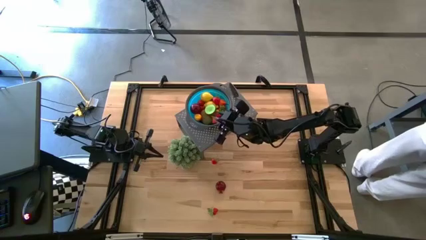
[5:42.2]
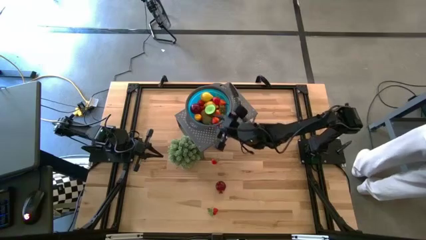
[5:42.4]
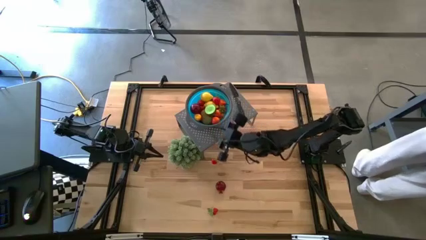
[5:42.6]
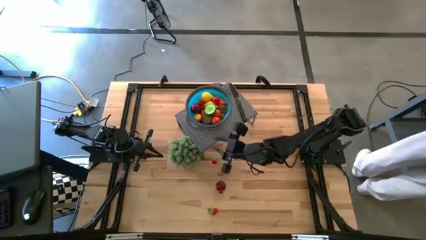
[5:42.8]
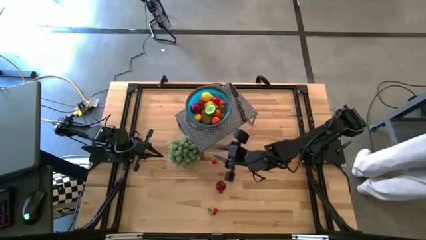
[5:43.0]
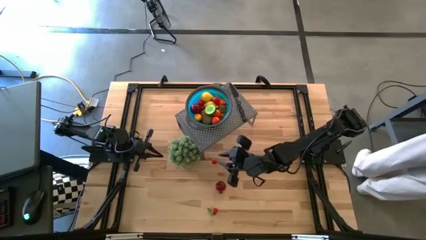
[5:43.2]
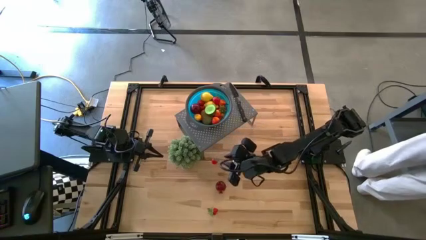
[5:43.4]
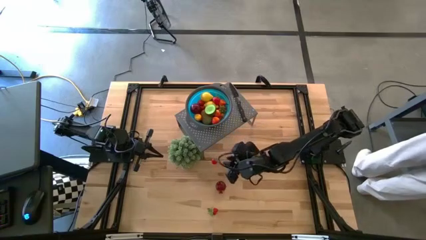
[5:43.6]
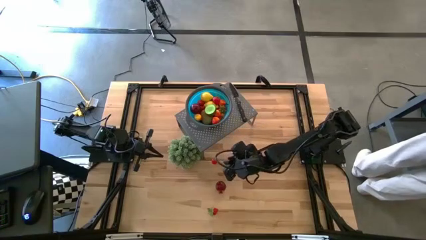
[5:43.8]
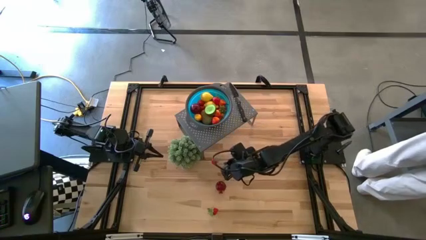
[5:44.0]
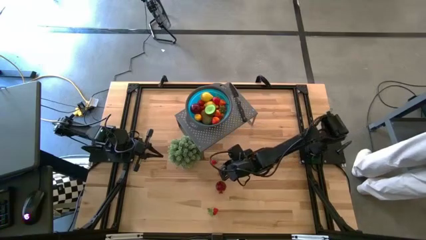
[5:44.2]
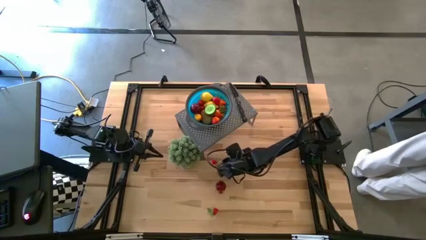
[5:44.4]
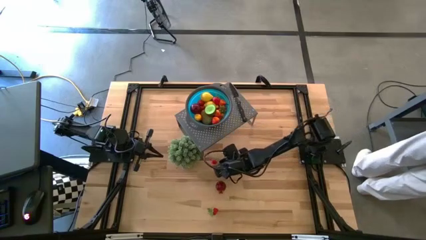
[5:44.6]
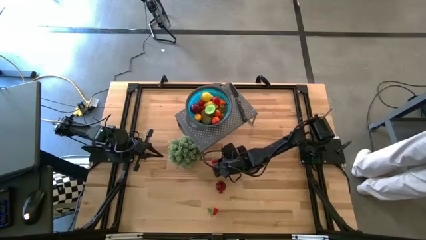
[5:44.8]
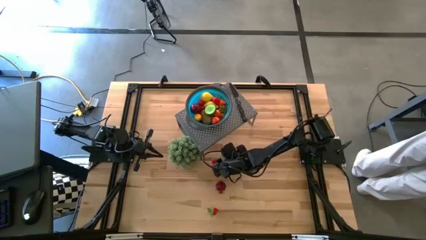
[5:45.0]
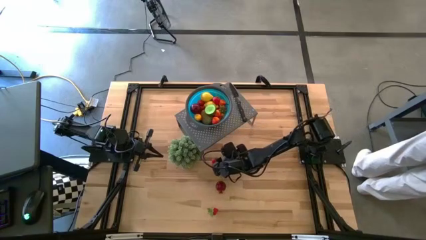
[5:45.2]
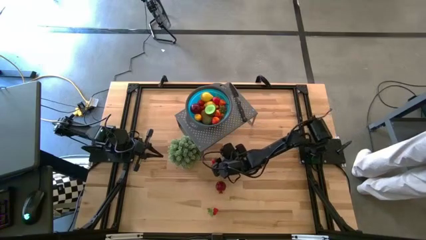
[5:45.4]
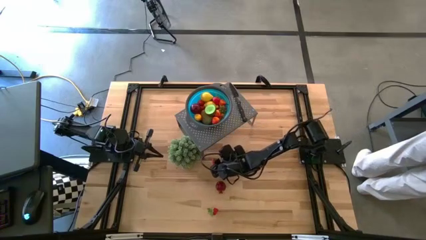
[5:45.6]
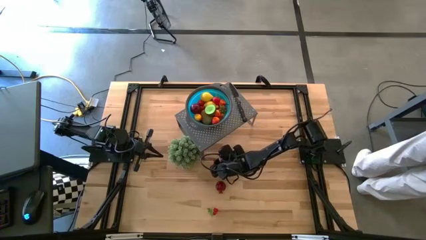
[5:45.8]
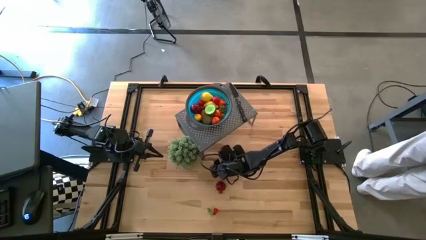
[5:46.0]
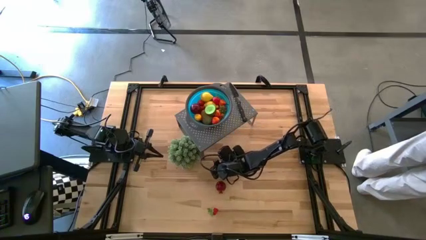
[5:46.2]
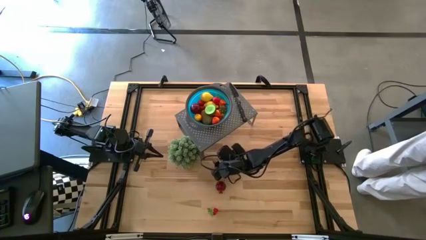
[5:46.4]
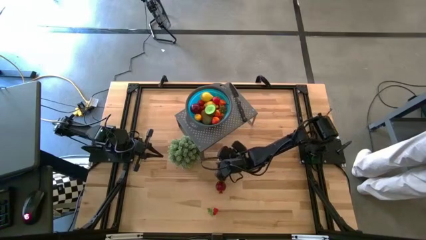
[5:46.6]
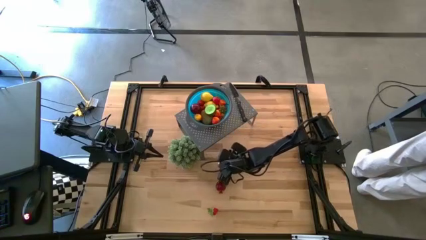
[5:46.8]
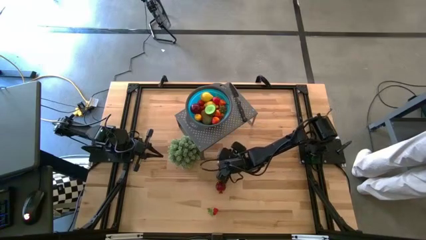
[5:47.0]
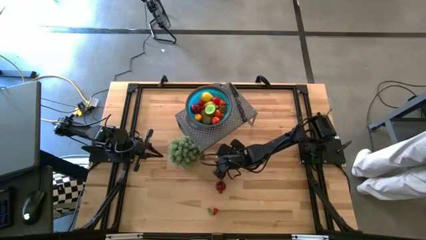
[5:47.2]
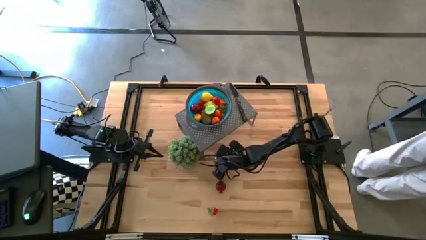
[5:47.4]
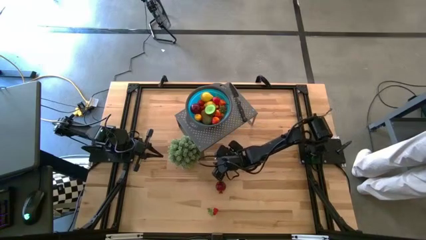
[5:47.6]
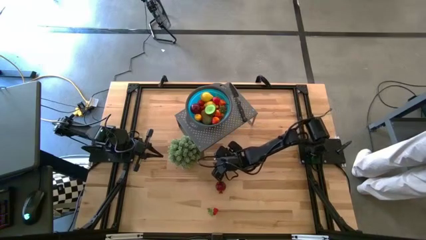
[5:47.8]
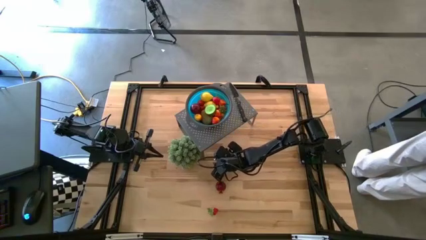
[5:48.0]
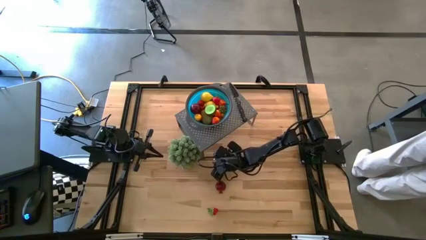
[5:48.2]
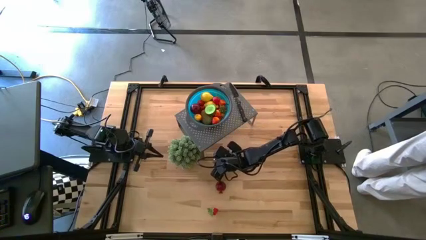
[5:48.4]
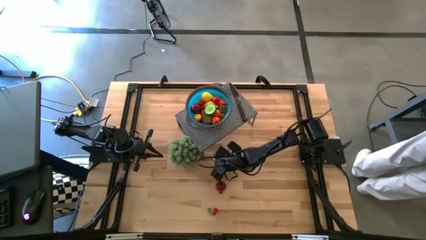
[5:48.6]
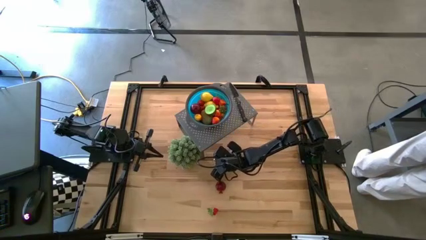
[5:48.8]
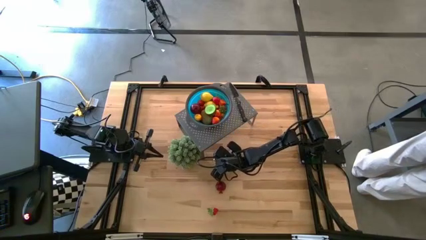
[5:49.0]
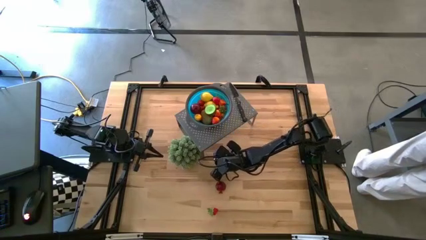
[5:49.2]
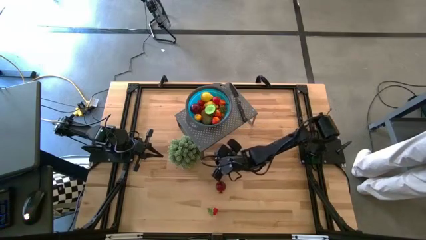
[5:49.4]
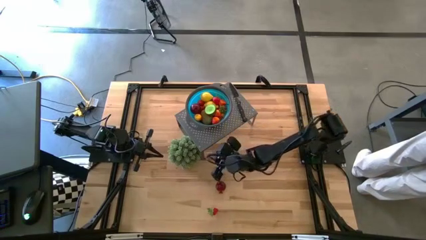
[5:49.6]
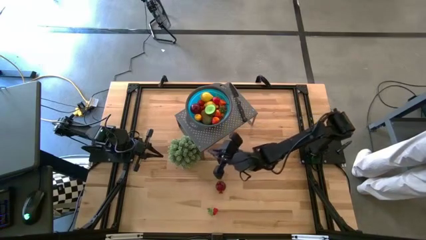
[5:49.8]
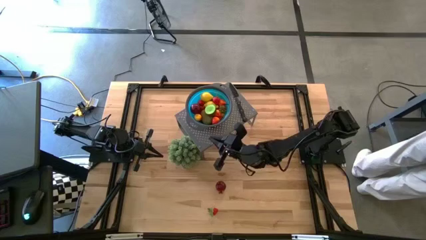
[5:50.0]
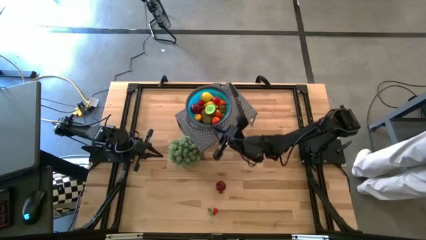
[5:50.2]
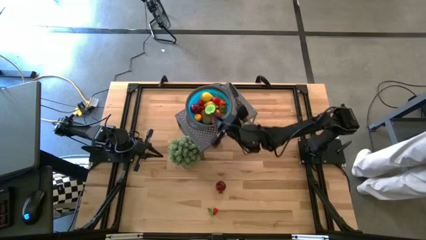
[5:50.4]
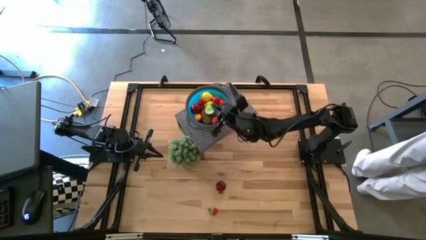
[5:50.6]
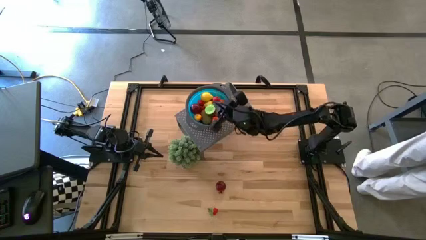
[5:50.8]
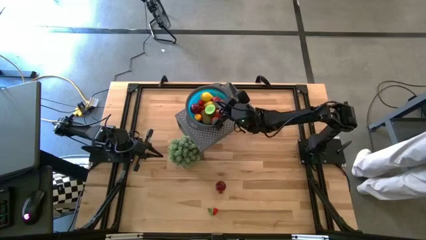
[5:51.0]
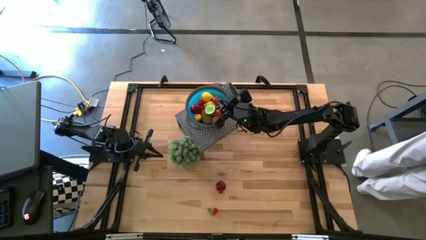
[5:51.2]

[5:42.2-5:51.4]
Task: Pick & Place Fruit
Put the strawberry into the blue strainer bowl on the shelf

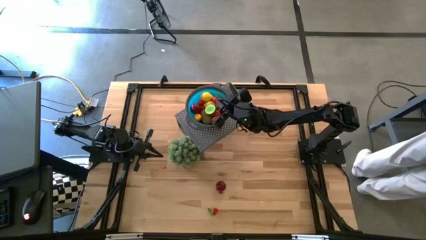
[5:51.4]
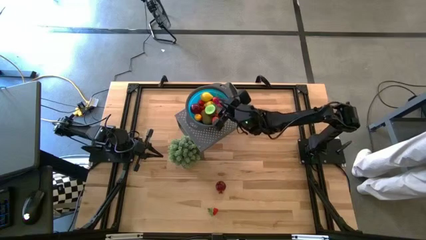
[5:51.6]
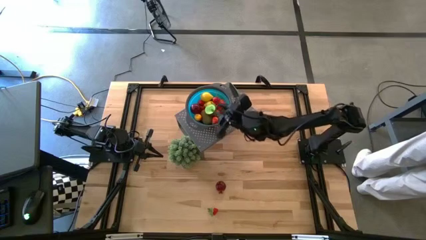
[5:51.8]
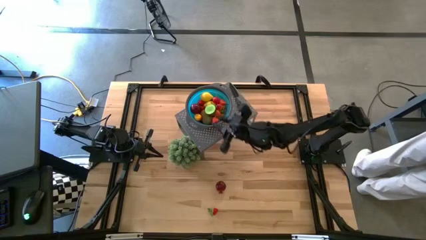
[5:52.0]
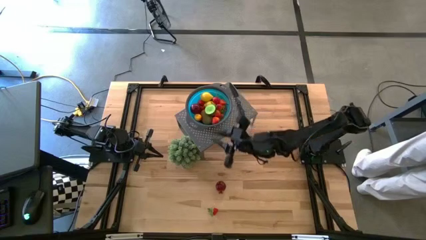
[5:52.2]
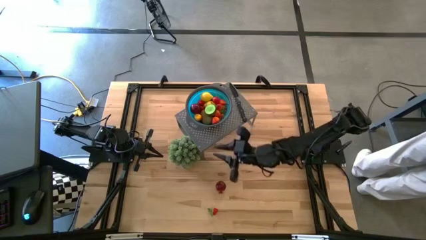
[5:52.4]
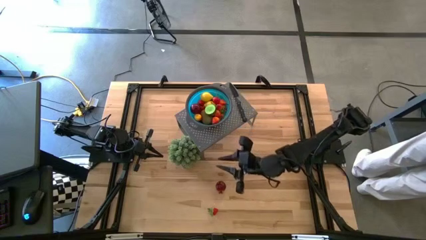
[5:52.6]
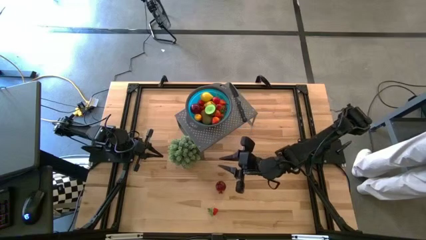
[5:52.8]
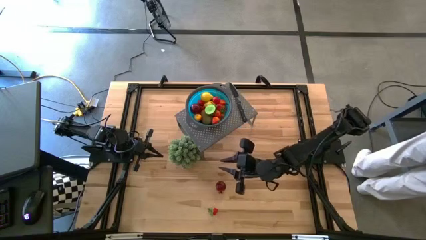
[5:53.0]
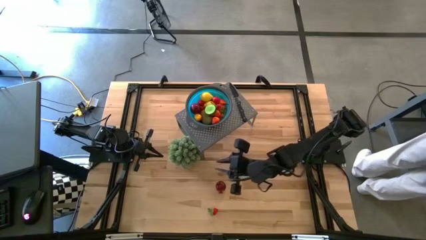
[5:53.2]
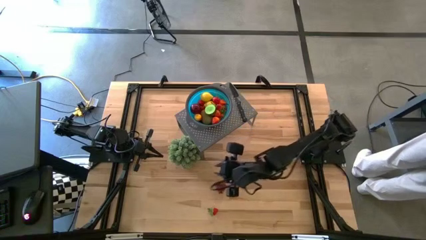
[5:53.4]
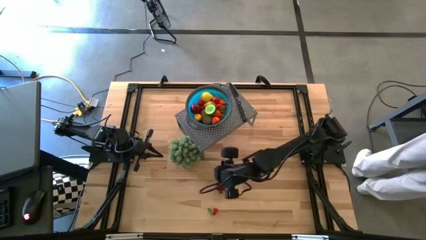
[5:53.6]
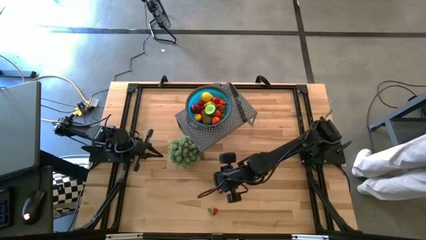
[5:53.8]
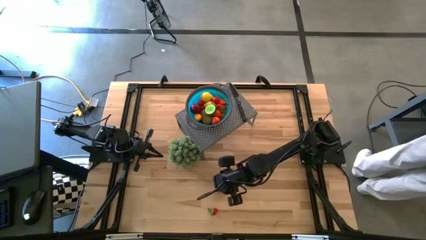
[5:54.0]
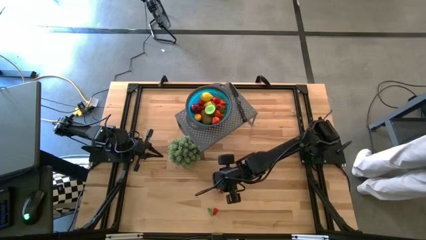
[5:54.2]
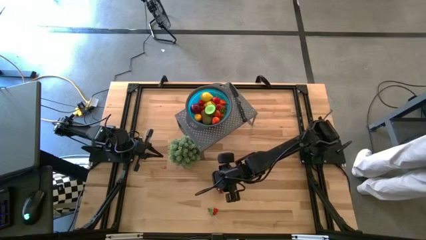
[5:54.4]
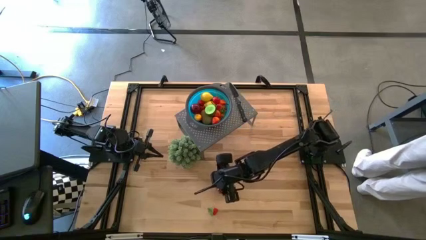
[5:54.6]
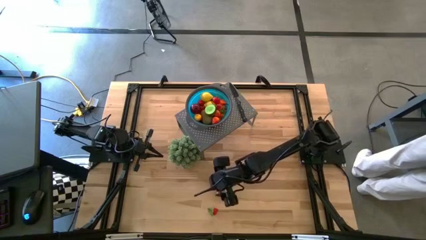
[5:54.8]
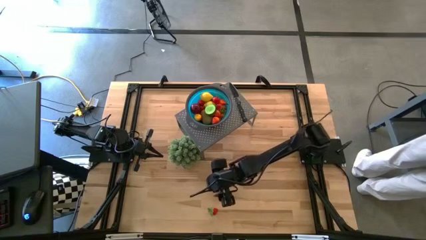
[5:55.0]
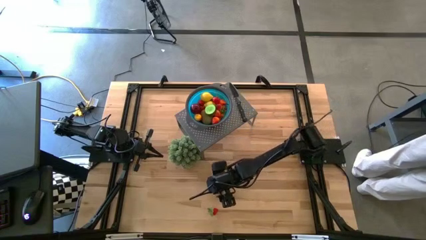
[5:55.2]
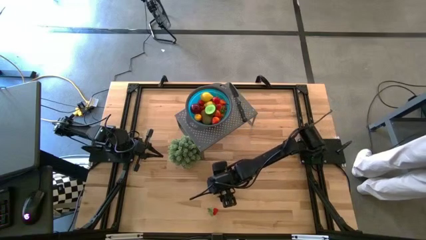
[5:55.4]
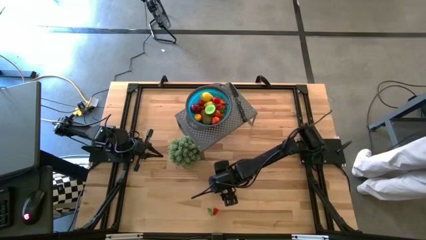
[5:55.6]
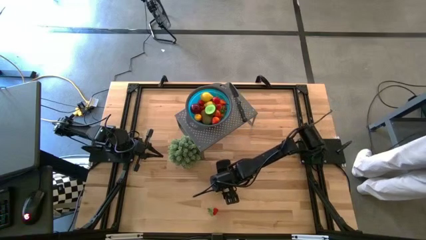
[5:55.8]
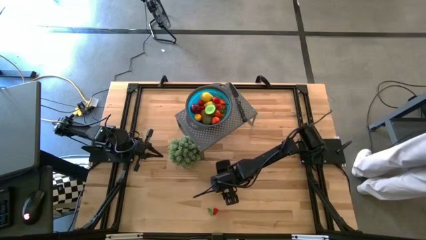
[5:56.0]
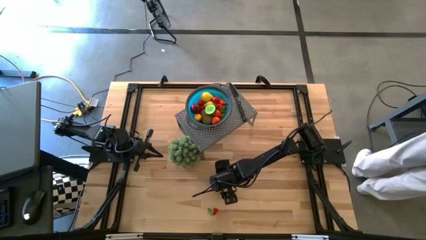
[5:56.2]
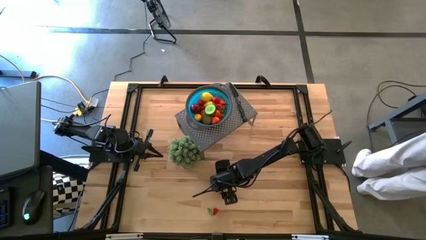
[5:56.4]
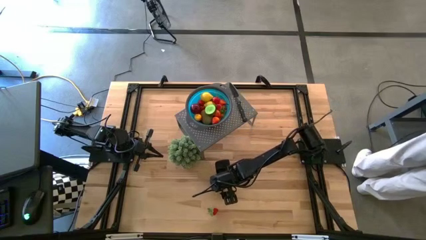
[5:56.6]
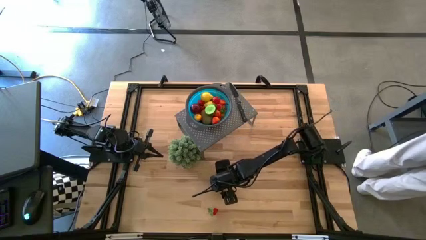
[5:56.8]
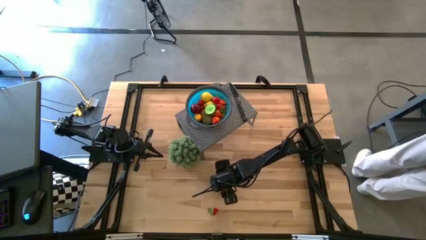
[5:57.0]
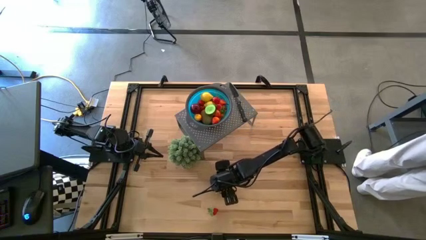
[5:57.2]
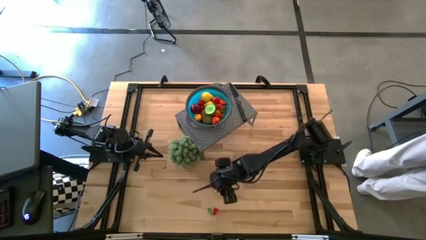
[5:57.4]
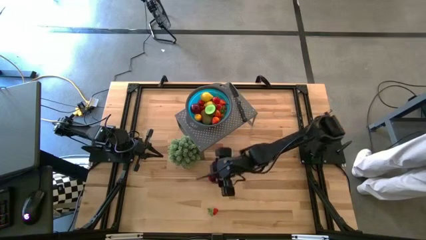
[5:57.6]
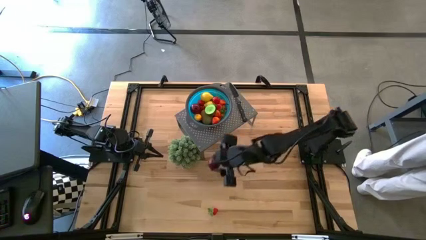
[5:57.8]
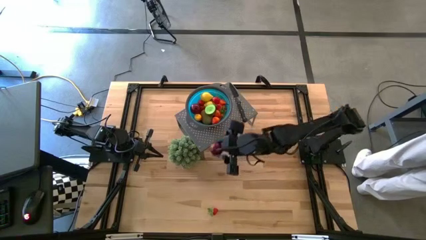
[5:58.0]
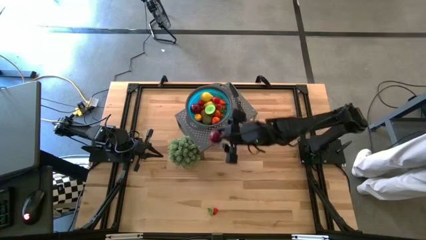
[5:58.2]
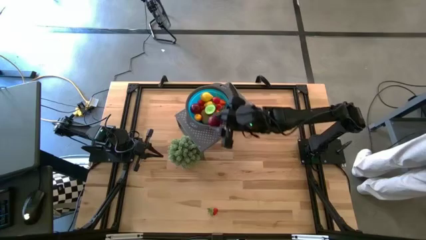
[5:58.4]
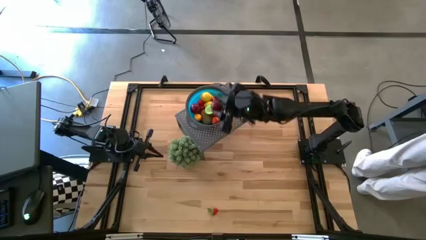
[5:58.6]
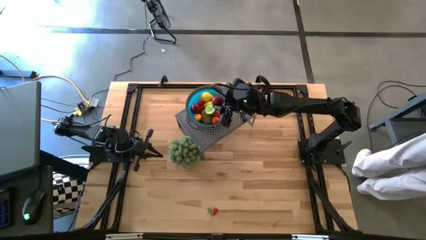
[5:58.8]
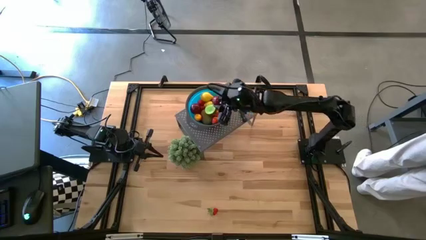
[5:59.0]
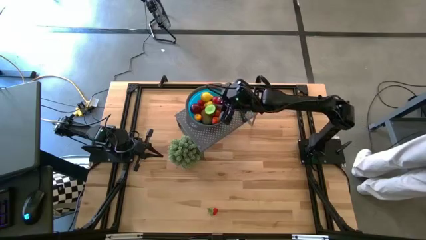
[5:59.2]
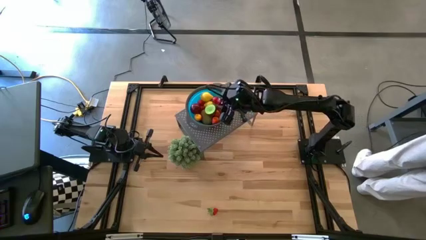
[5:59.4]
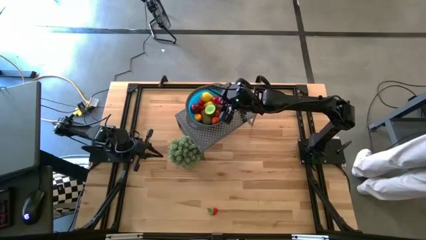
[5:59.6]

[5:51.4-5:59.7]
Put the pomegranate into the blue strainer bowl on the shelf
